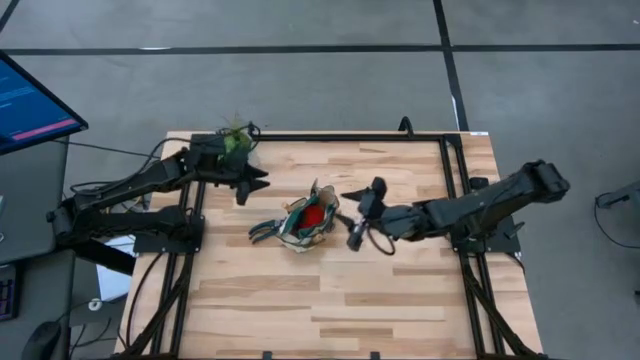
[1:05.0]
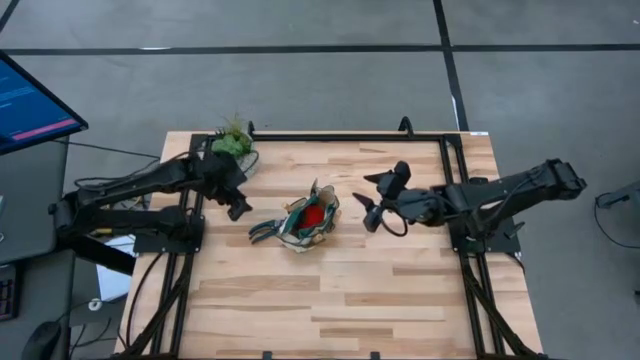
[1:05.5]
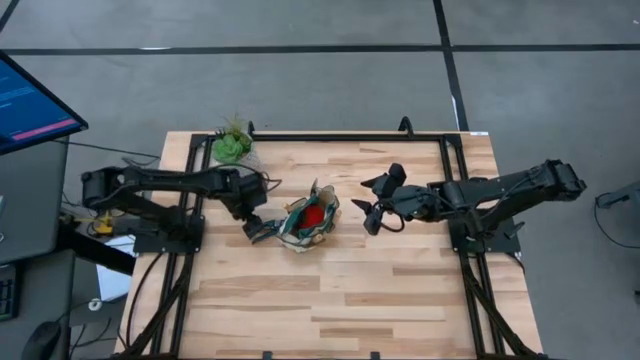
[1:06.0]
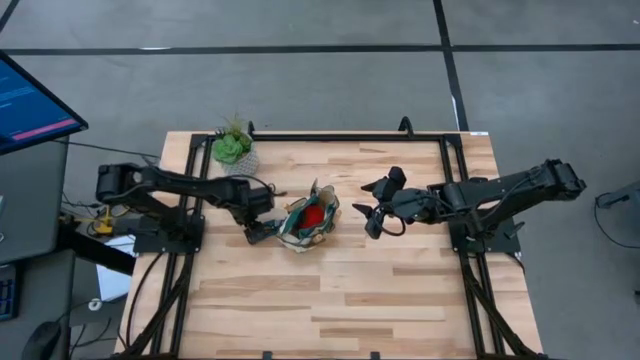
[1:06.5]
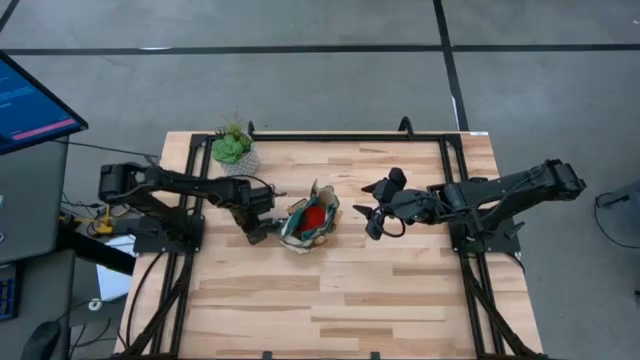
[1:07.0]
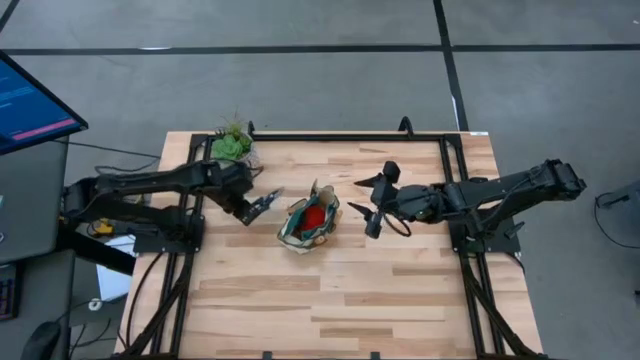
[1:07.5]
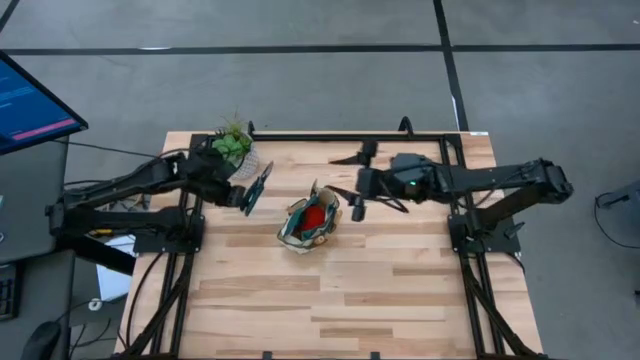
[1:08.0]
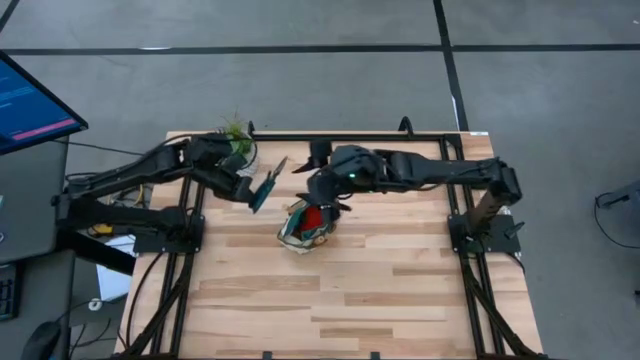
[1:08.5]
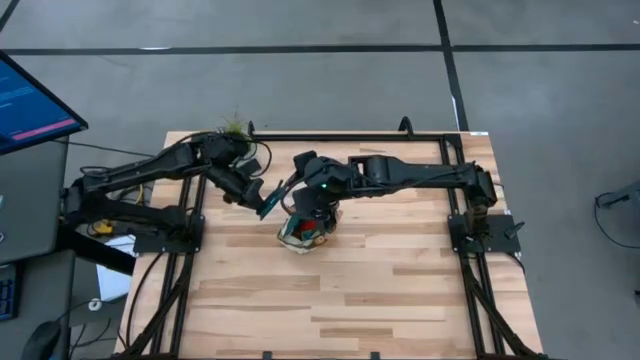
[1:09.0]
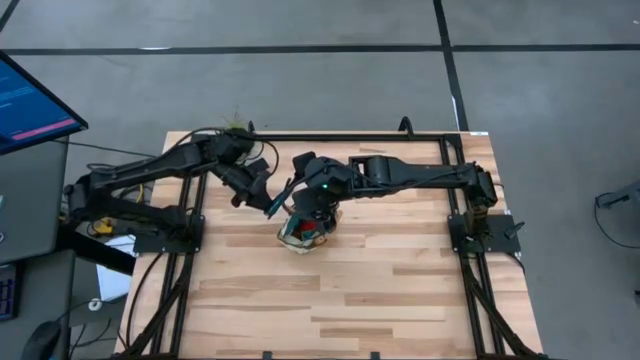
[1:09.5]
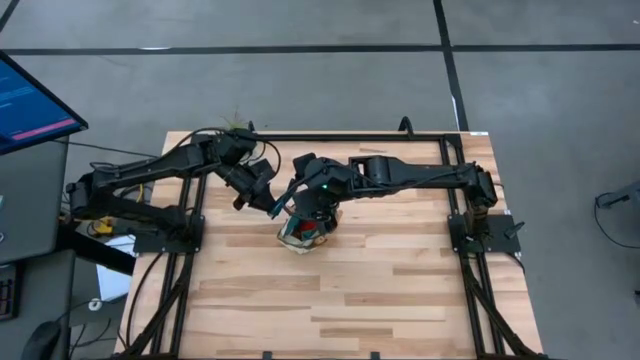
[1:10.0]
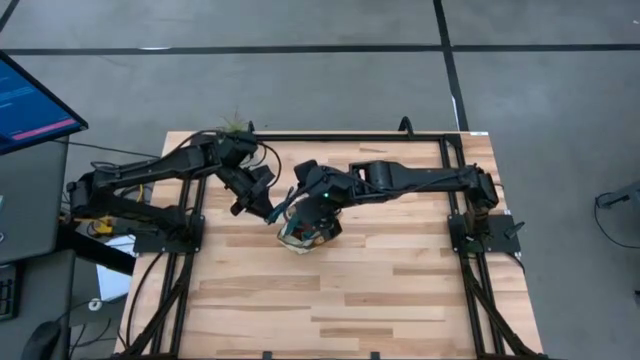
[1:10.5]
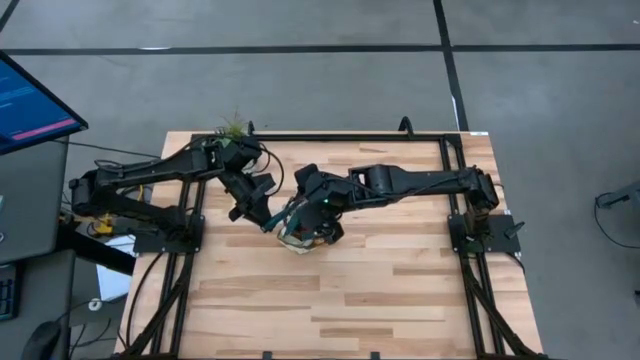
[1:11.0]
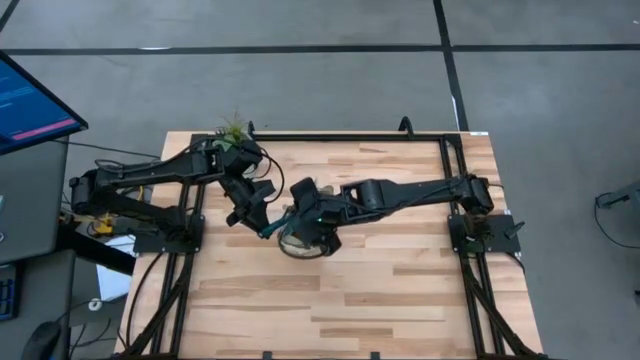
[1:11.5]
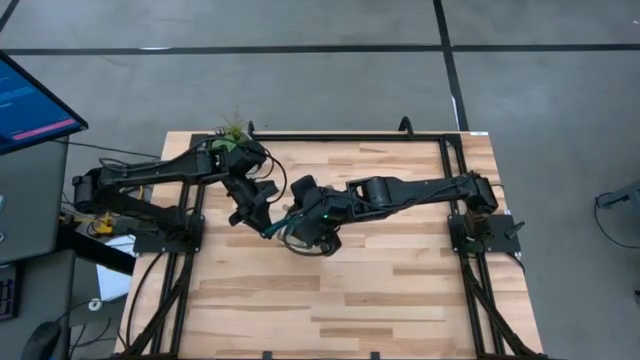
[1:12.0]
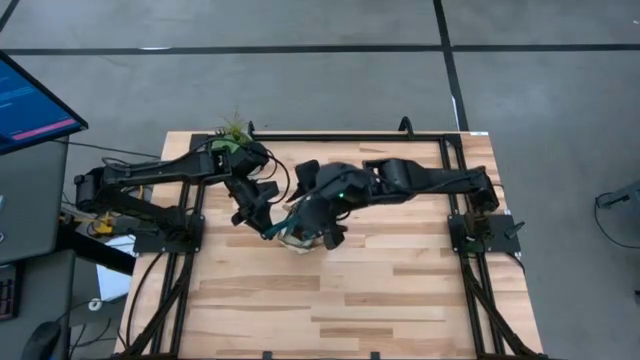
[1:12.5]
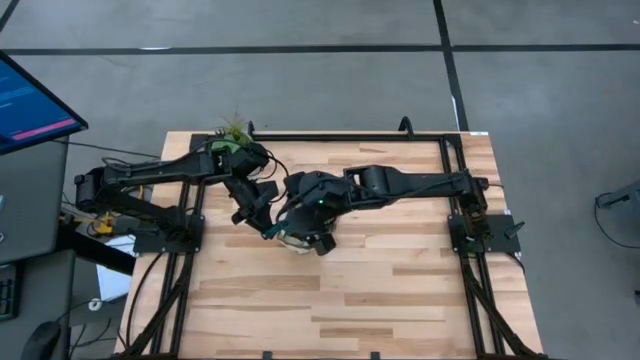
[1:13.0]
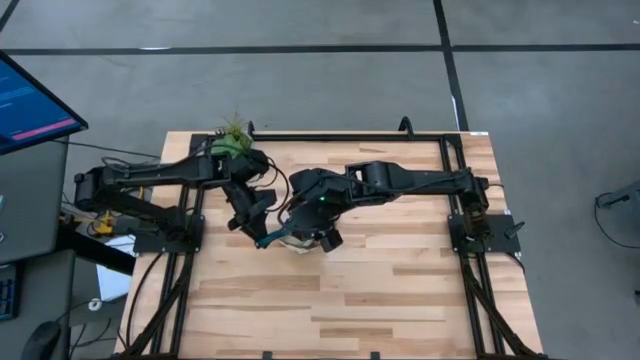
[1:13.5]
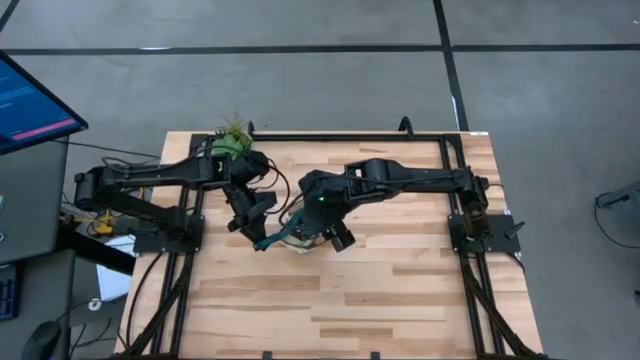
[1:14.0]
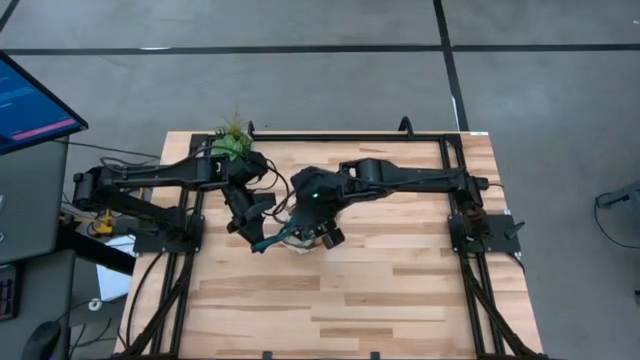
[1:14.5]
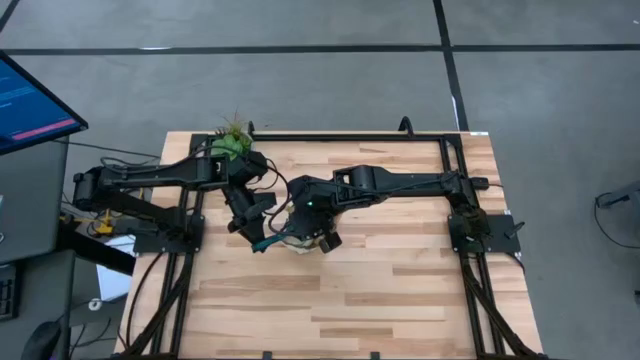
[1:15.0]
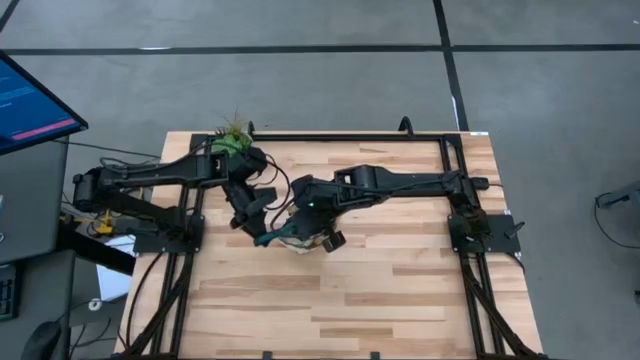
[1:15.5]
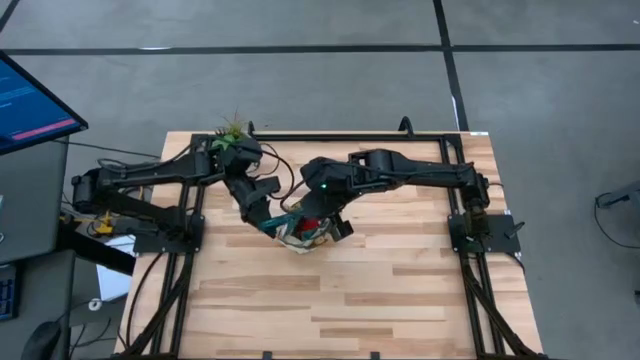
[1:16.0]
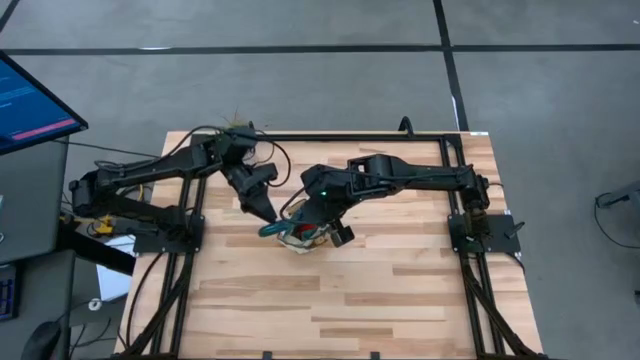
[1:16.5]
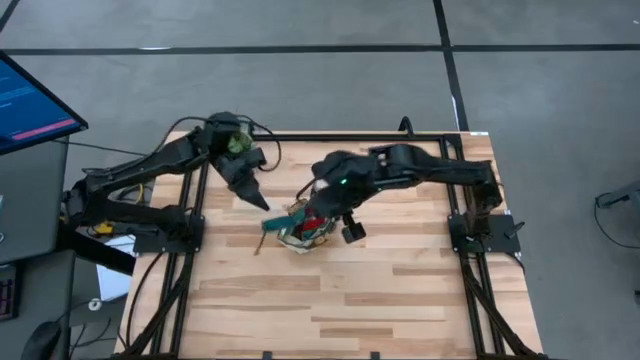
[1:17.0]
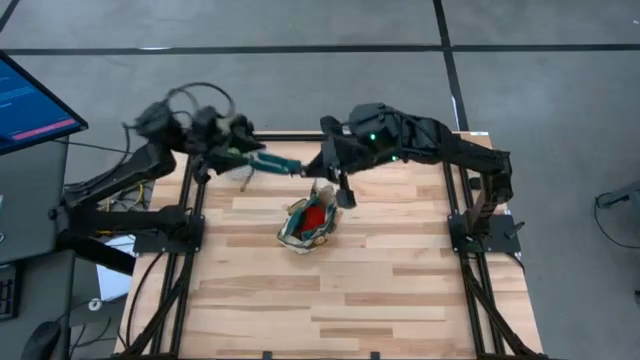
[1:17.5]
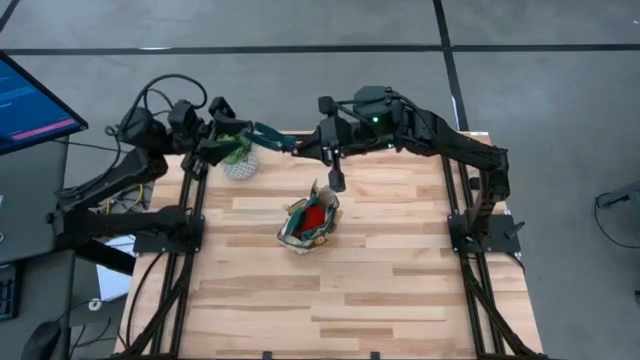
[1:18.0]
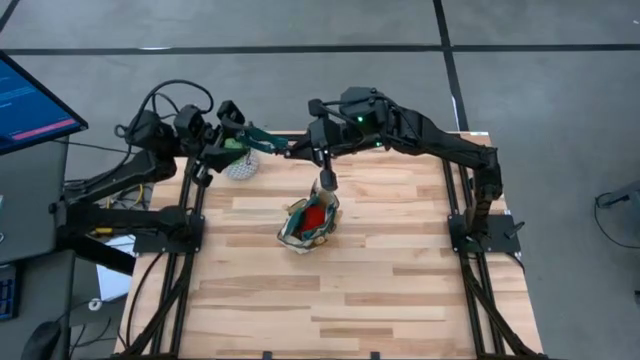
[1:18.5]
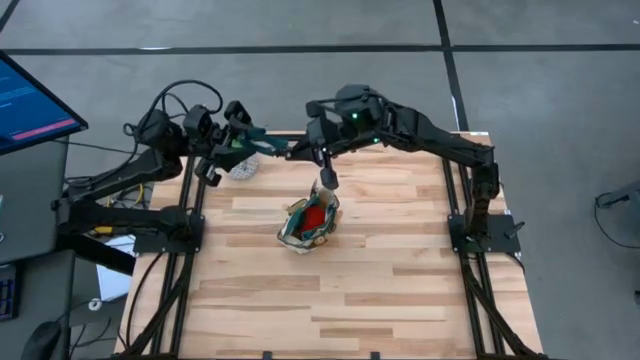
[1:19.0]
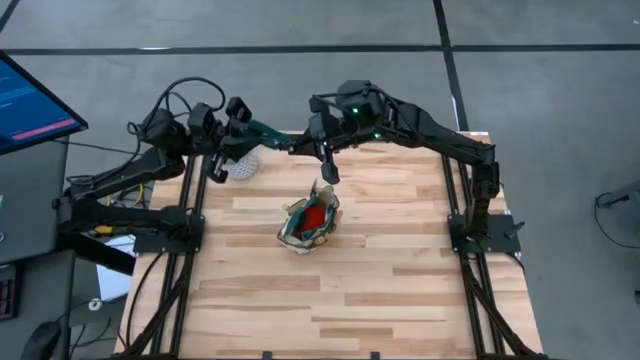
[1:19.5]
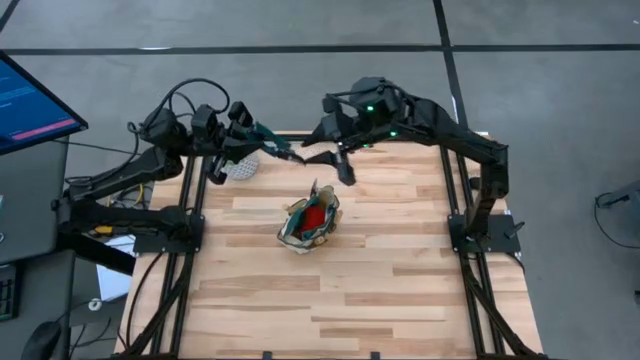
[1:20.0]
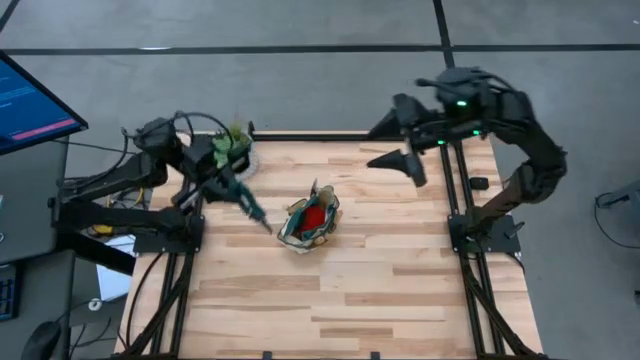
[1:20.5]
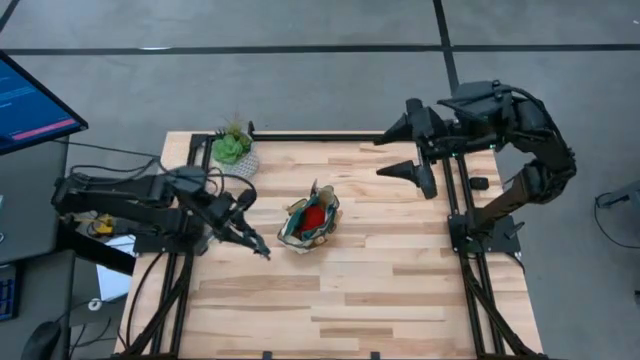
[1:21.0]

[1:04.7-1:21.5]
Task: Pick & Place Garden tools in Gardening bag
Put the shear scissors into the gardening bag
